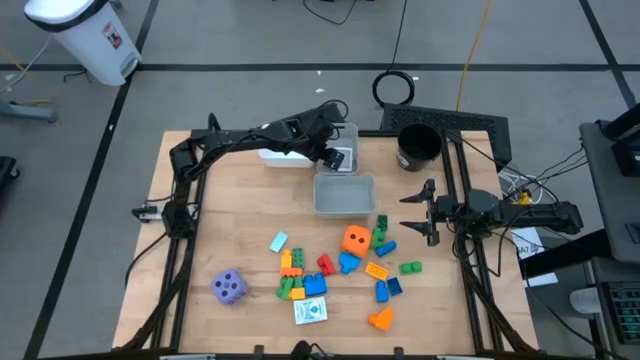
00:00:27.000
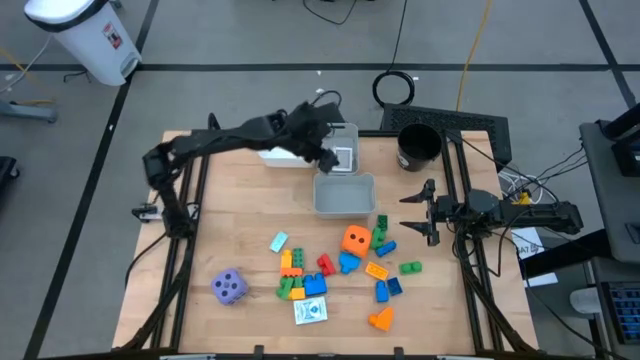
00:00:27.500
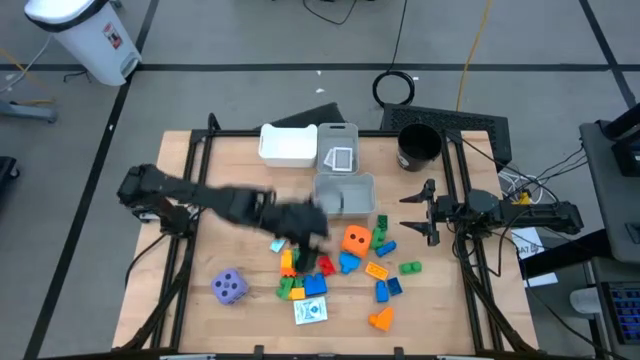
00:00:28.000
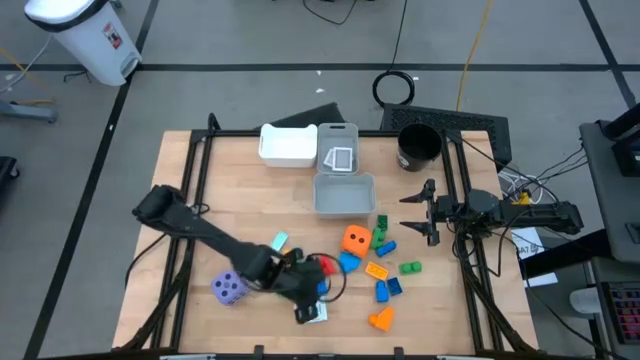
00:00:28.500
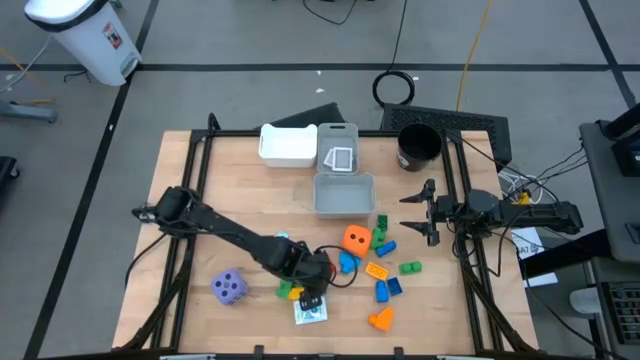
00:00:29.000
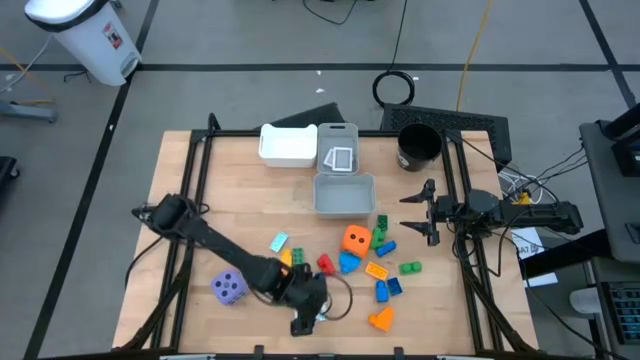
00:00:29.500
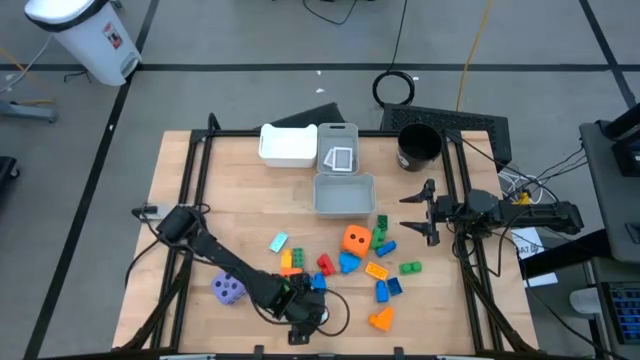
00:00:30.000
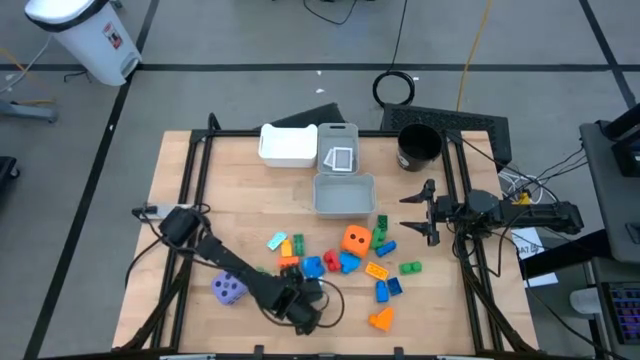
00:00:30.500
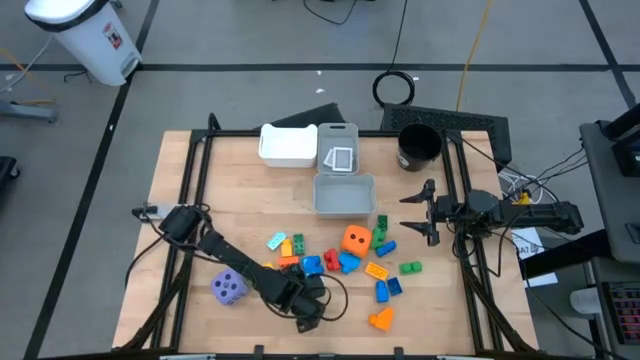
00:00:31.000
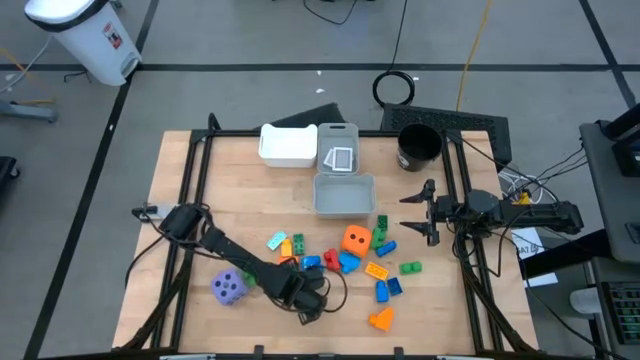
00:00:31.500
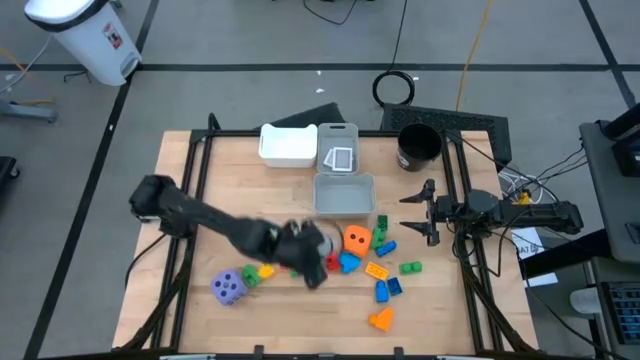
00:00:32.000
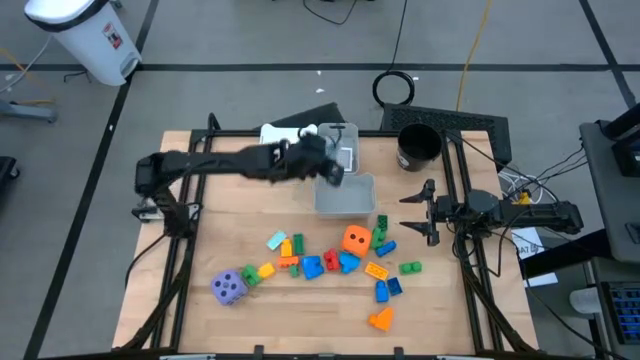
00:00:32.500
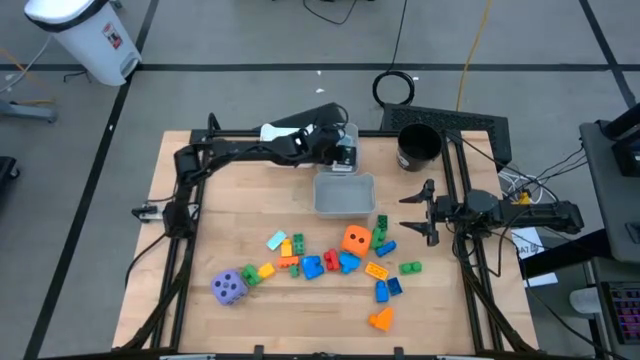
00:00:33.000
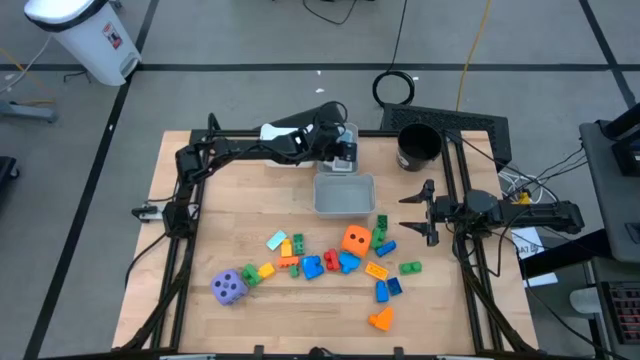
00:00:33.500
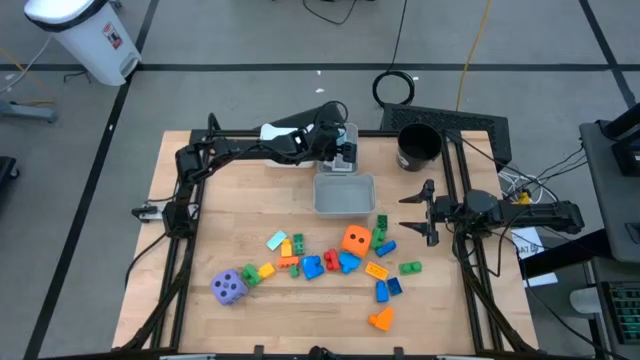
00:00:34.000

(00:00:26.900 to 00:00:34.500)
Task: Pick & Place Toys
Put the blue playing card box into the top gray bin

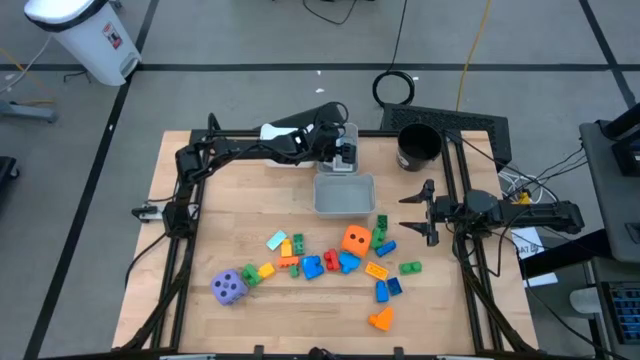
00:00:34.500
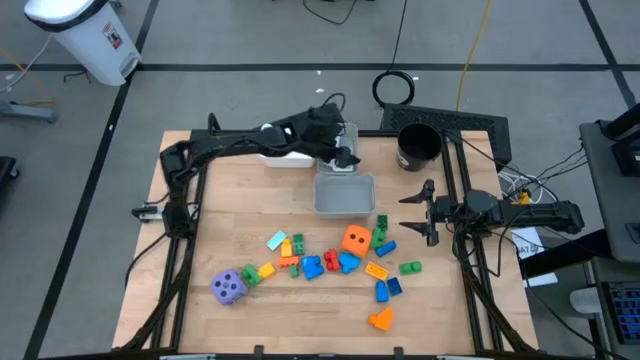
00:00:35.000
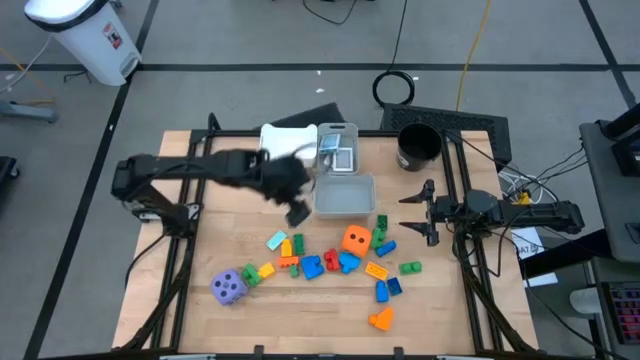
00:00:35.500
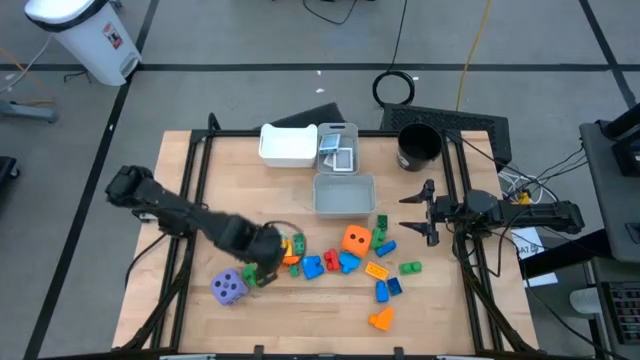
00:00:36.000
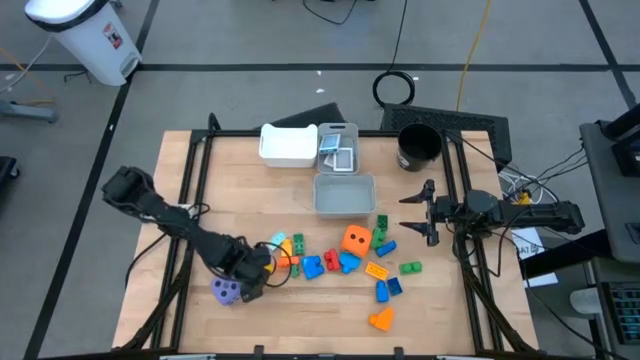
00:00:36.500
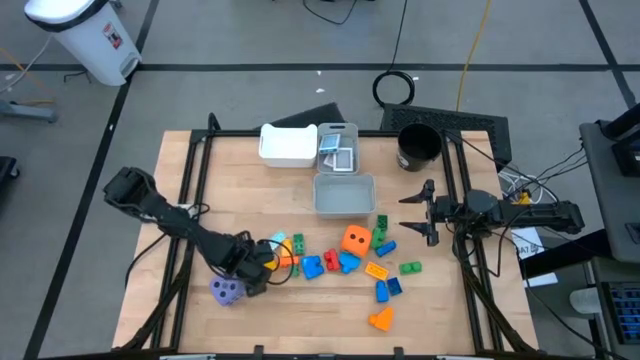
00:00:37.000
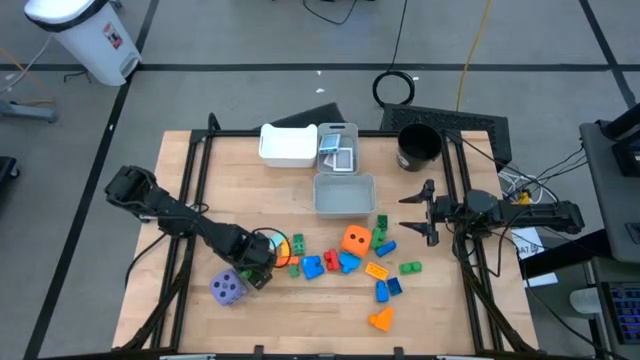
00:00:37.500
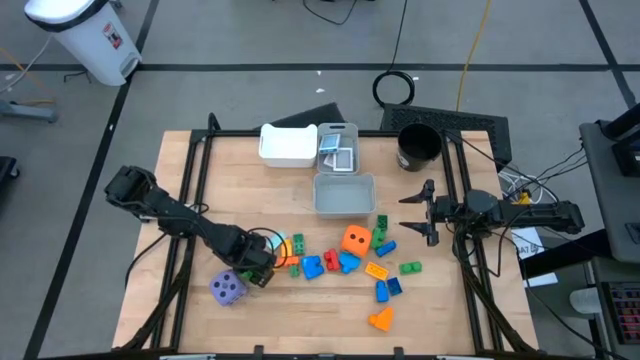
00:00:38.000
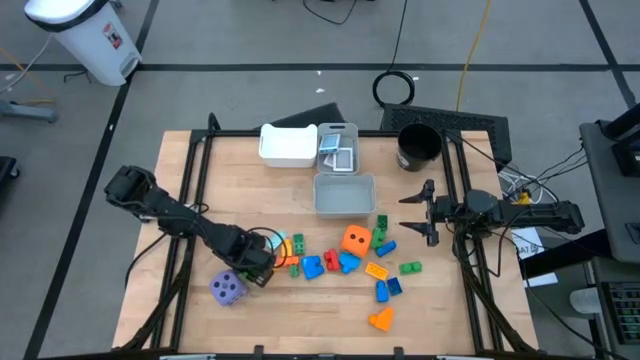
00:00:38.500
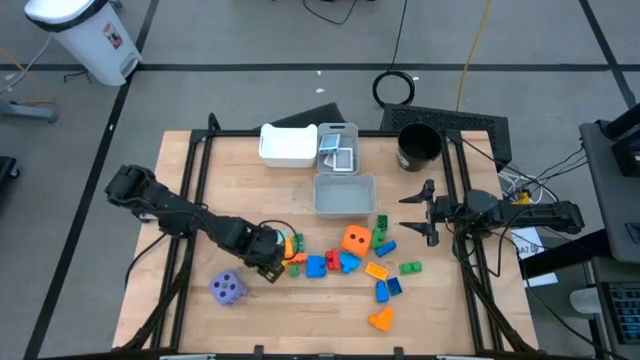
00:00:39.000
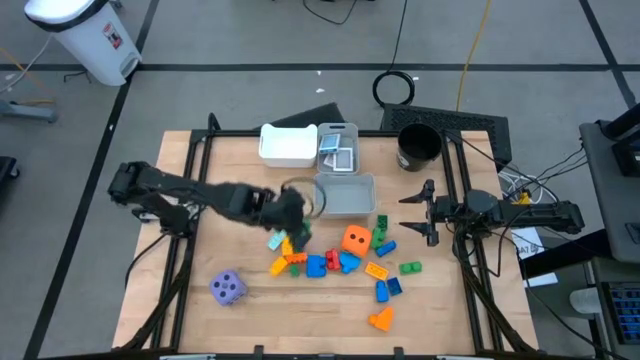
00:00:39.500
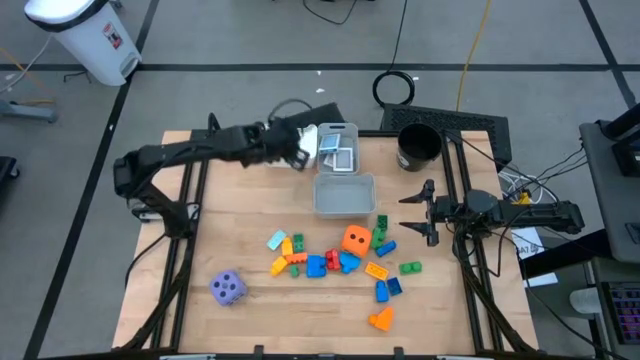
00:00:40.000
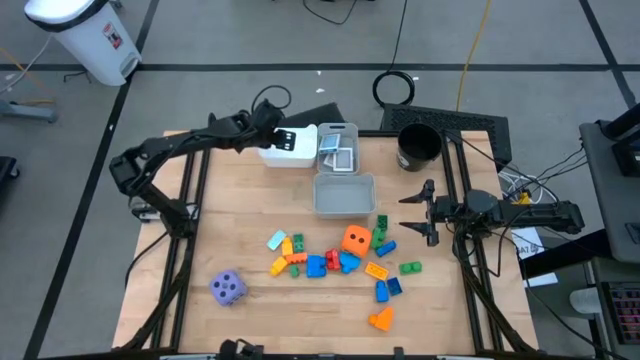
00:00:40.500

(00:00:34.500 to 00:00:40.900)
Put the green game piece into the white bin

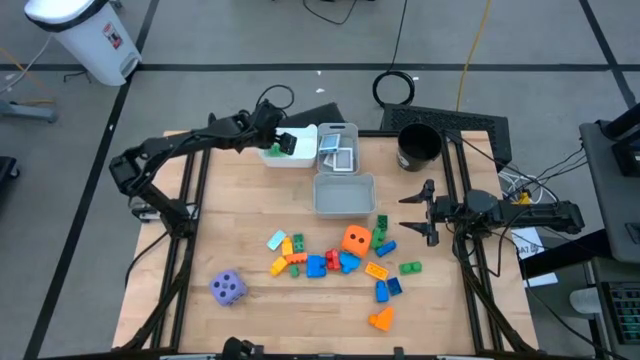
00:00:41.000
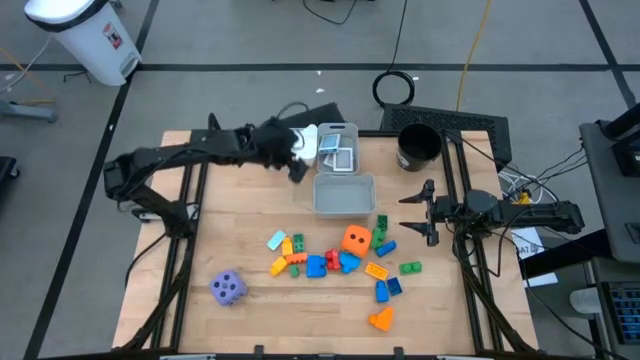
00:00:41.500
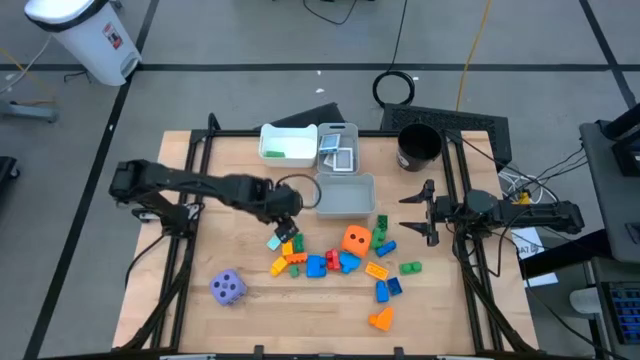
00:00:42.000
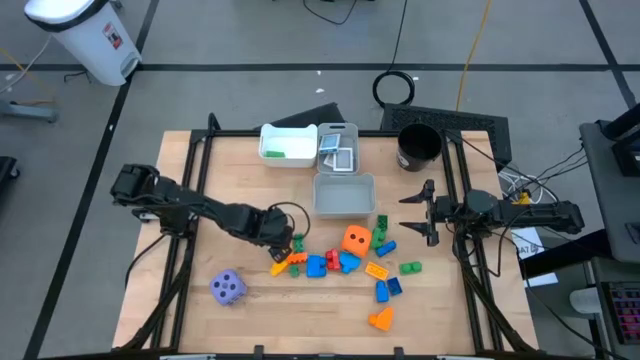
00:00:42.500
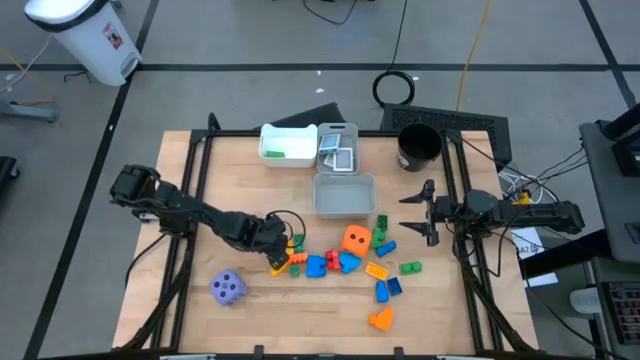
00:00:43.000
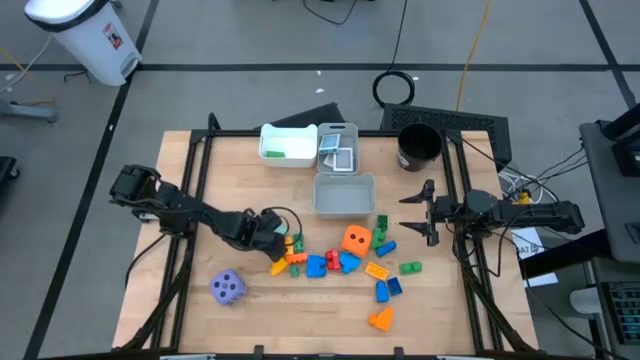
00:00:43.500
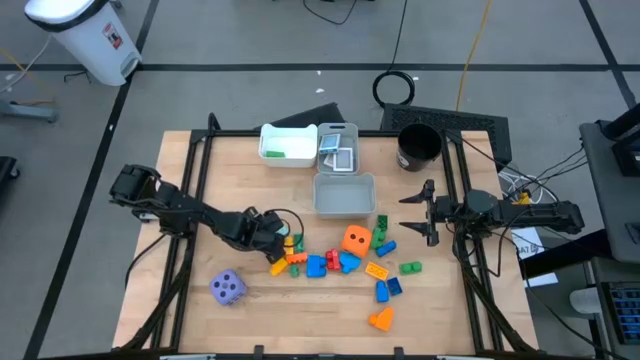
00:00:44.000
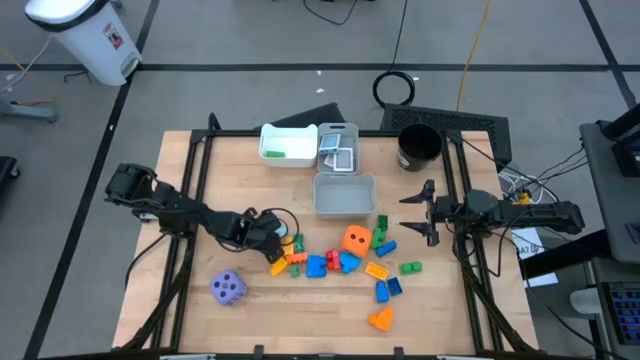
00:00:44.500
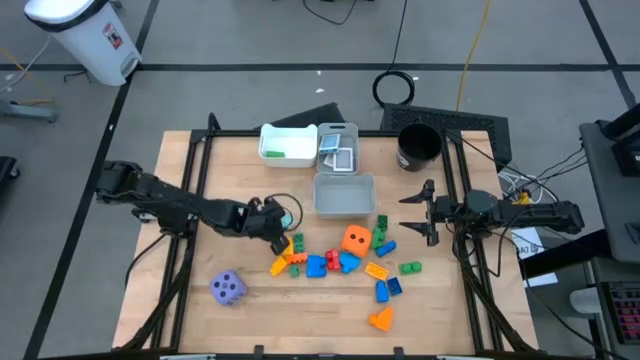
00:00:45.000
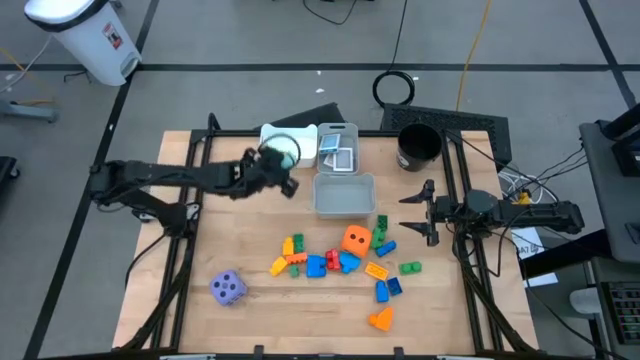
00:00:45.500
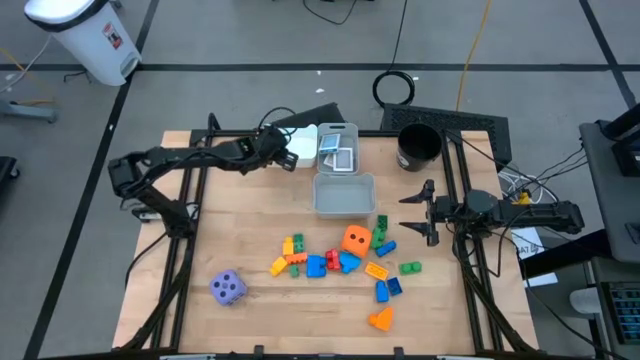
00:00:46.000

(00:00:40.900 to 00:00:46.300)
Put the light blue game piece into the white bin

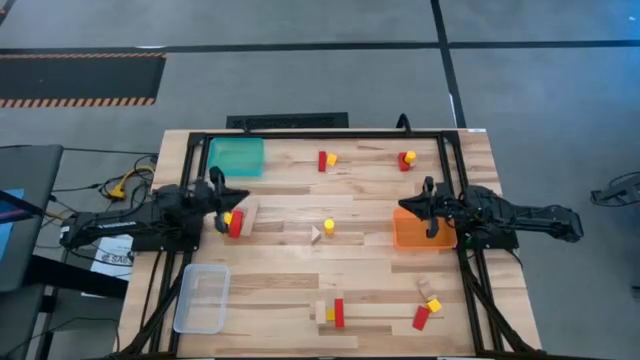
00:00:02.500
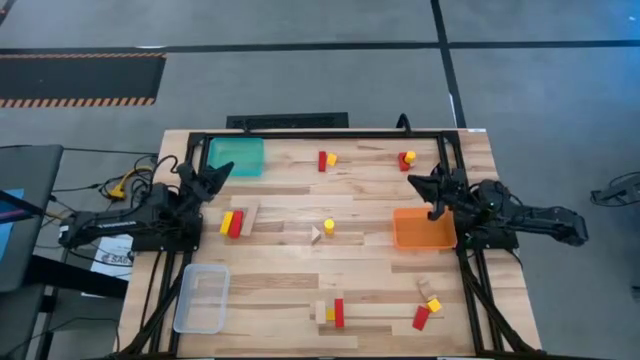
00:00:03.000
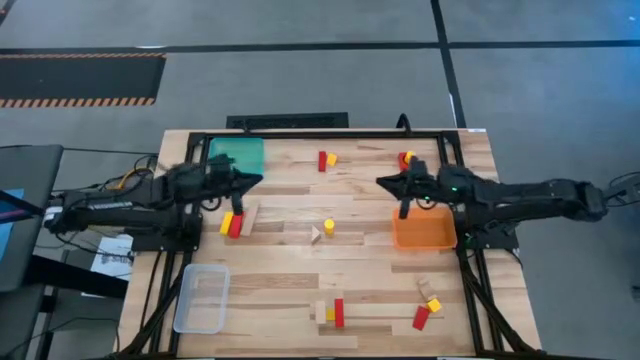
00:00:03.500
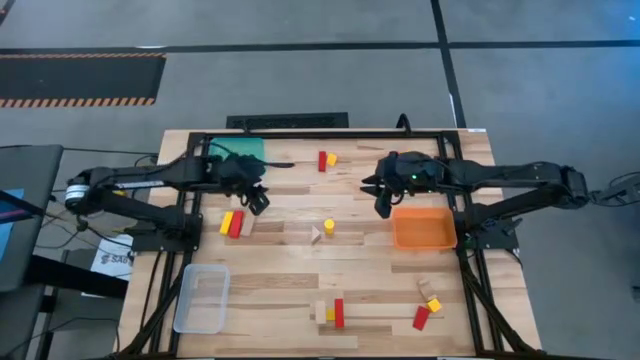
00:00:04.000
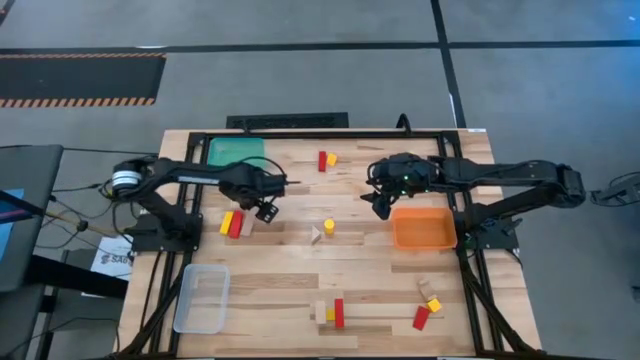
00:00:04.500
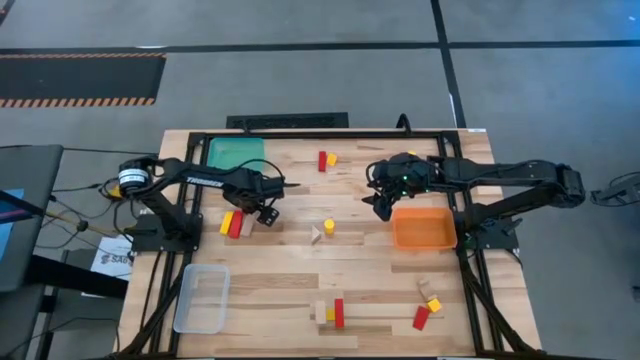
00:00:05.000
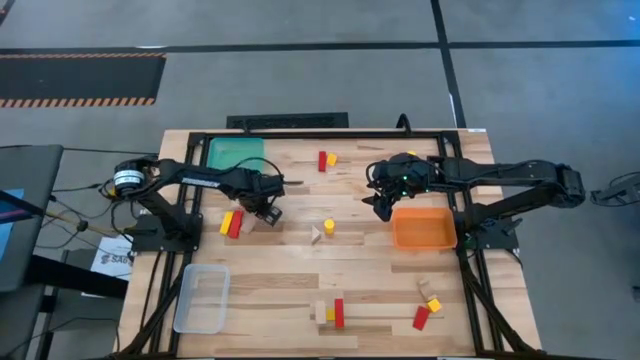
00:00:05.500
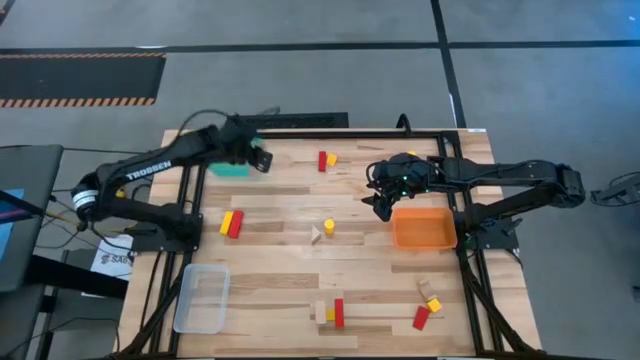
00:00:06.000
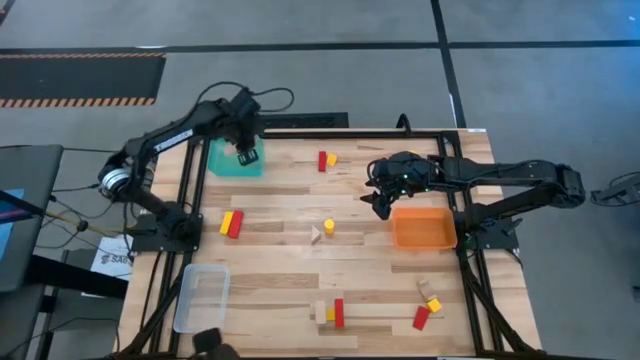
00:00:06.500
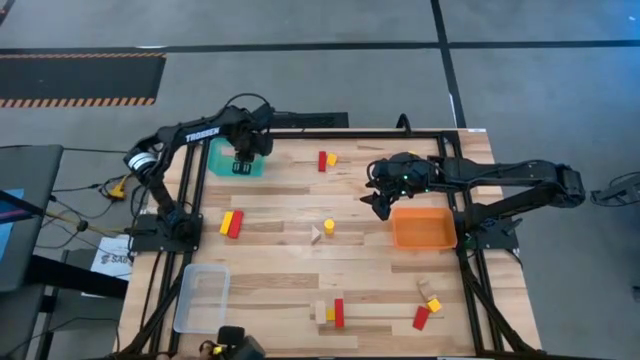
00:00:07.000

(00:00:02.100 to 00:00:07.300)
Task: Sort & place blocks by color
Put the light brown block into the light blue bin
